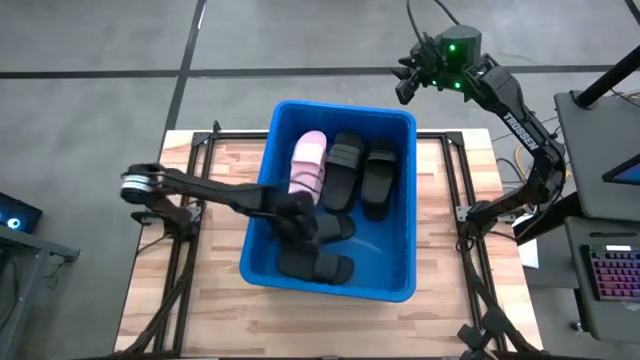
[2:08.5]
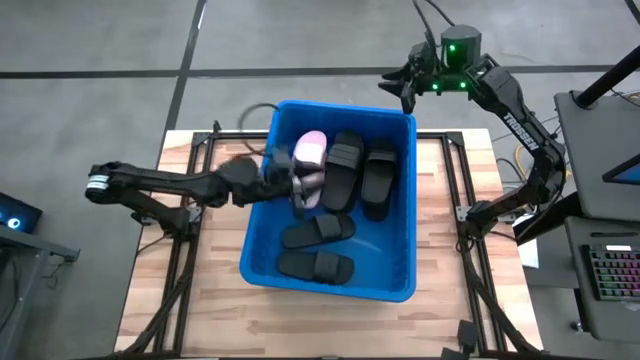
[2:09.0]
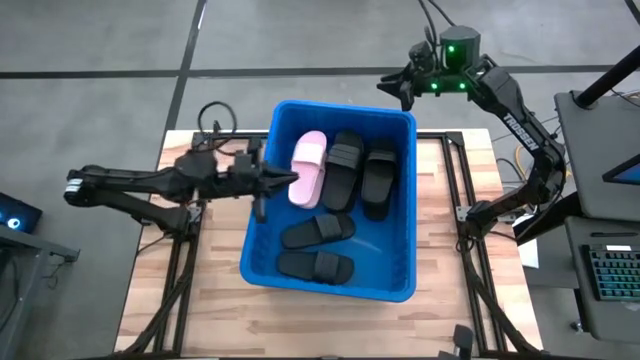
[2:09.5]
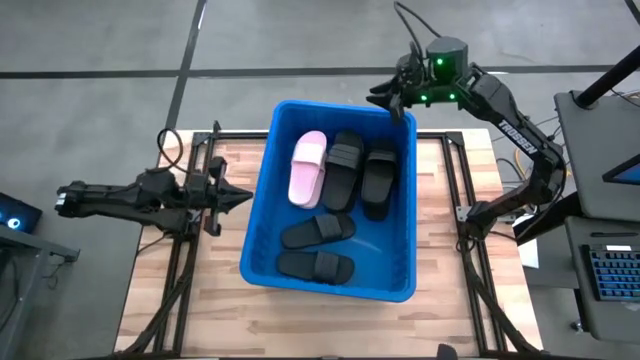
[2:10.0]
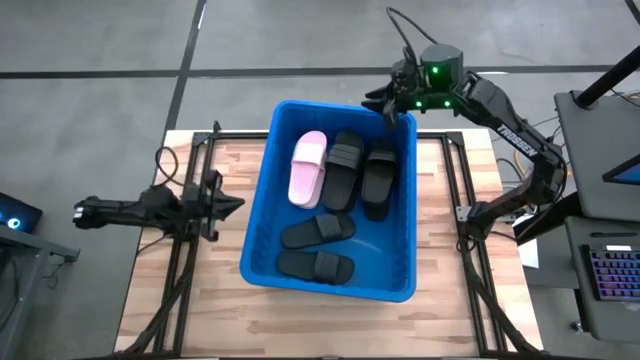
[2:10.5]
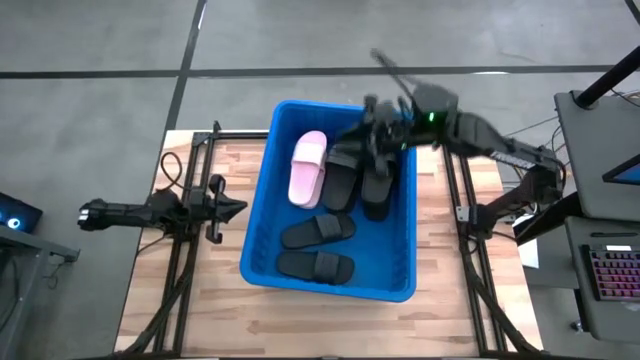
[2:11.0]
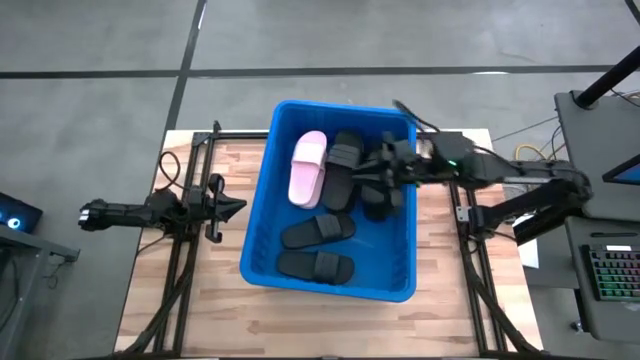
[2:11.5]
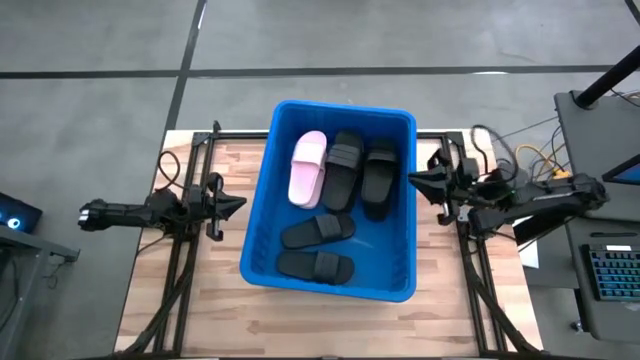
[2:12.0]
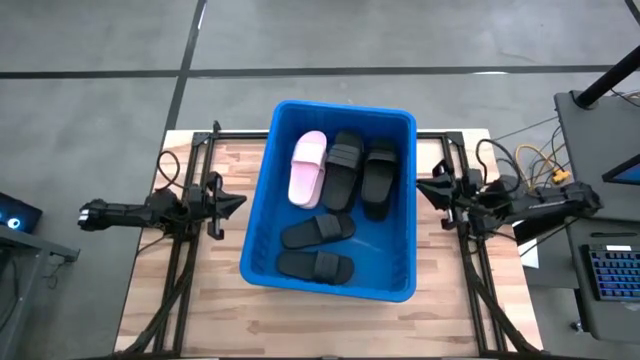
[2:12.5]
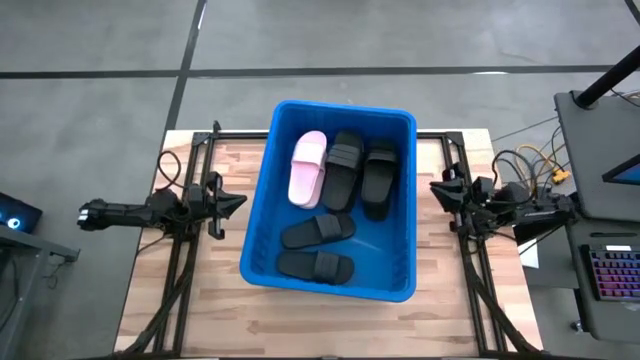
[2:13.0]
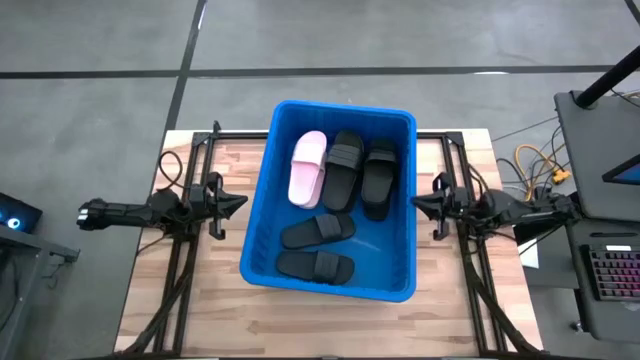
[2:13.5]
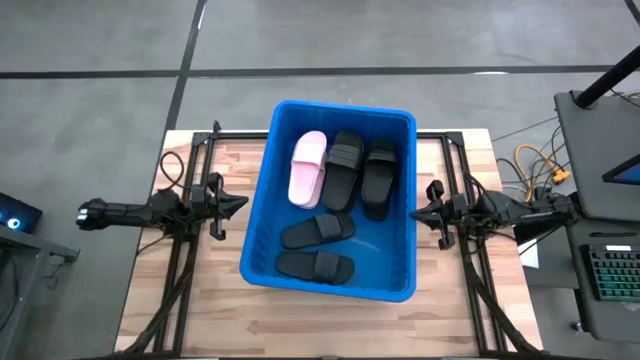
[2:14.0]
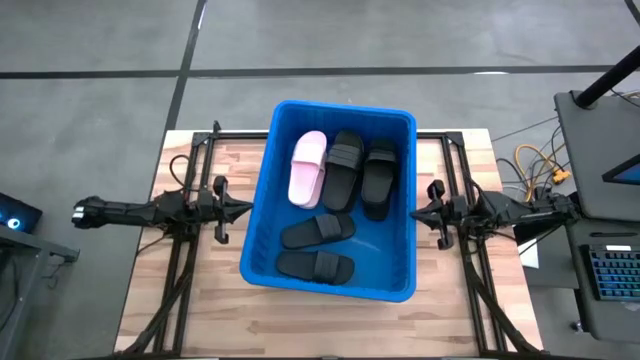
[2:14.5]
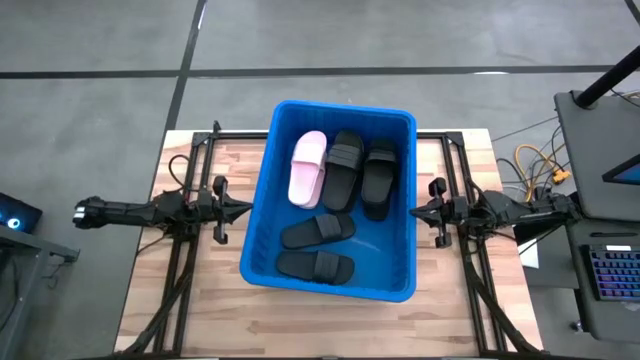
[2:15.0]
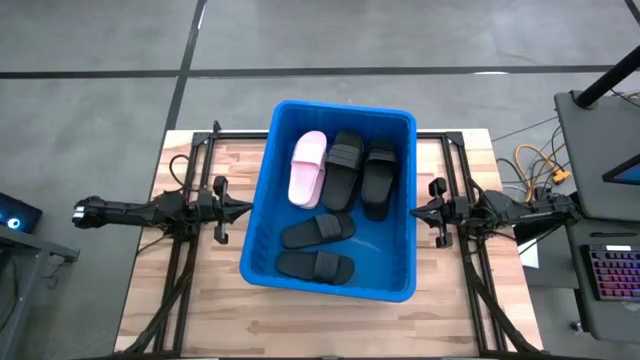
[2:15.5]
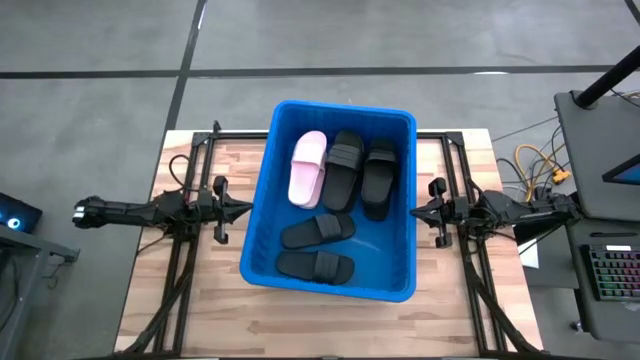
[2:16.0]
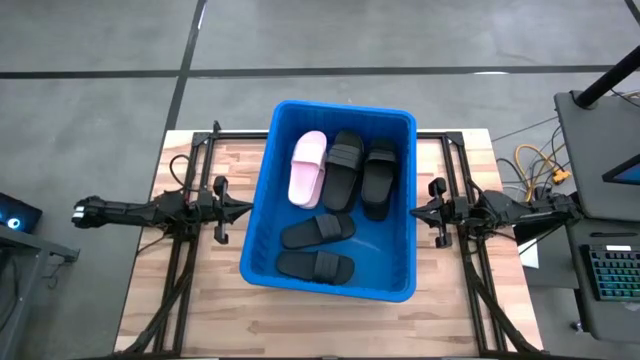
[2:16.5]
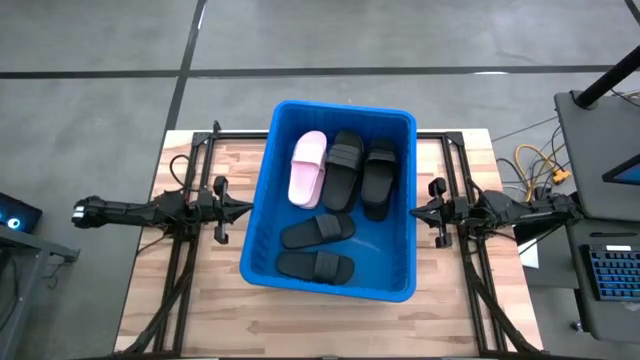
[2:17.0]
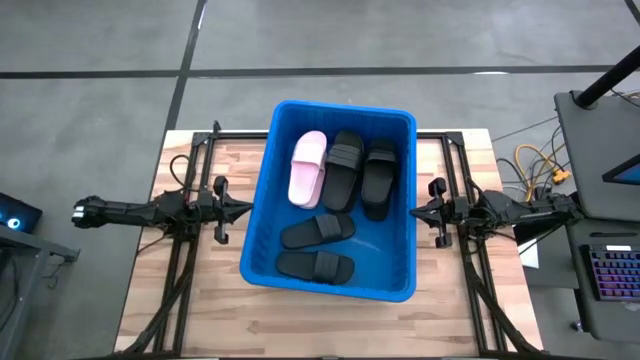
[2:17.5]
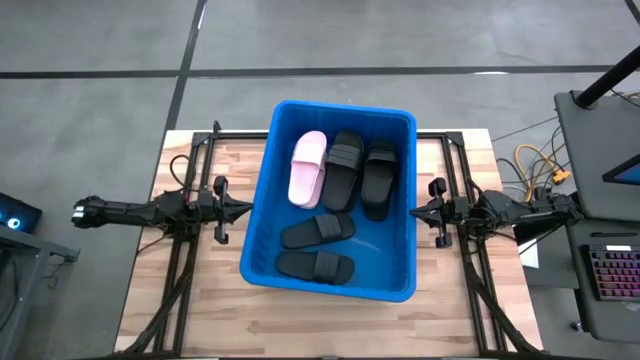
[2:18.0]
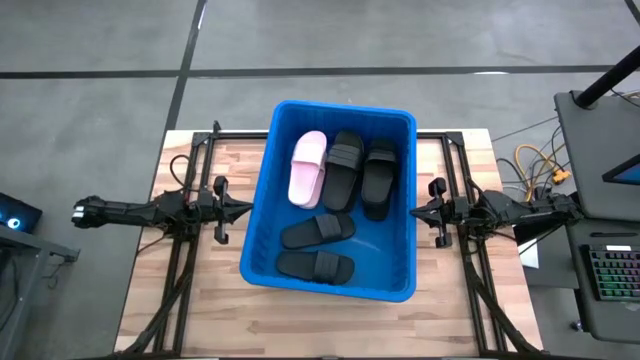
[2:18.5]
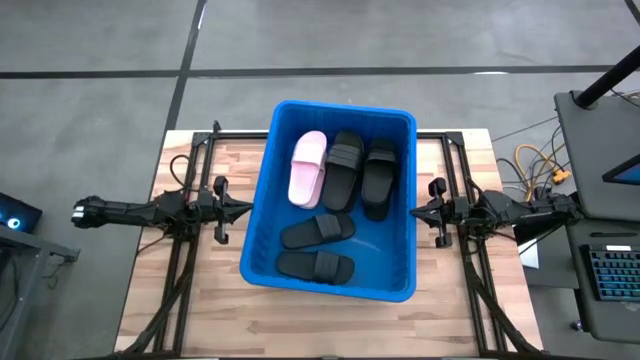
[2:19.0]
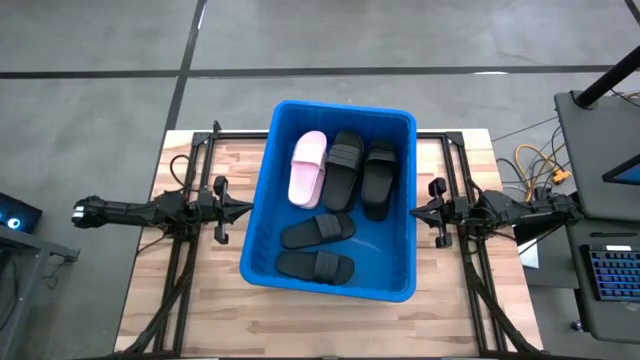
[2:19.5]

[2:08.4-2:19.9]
Task: Pick and place slides into bin
Return to Home Position

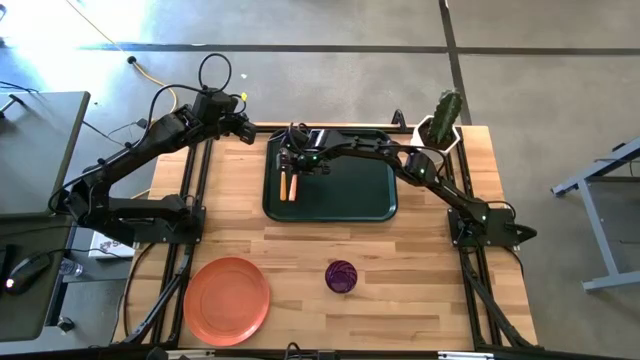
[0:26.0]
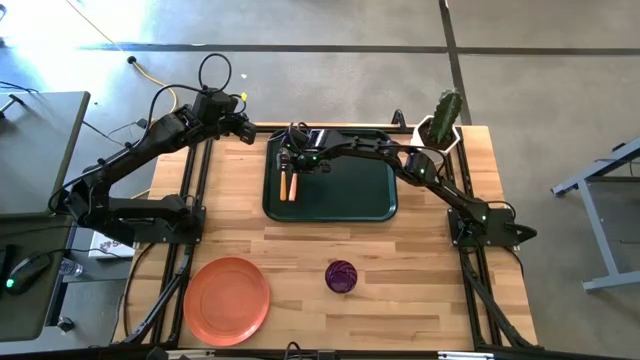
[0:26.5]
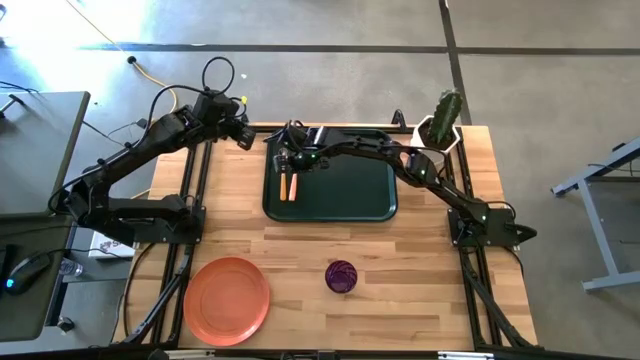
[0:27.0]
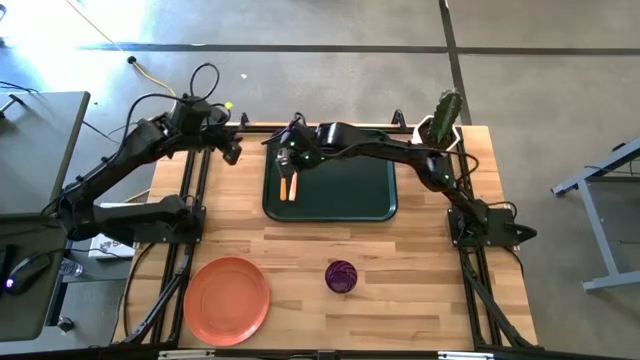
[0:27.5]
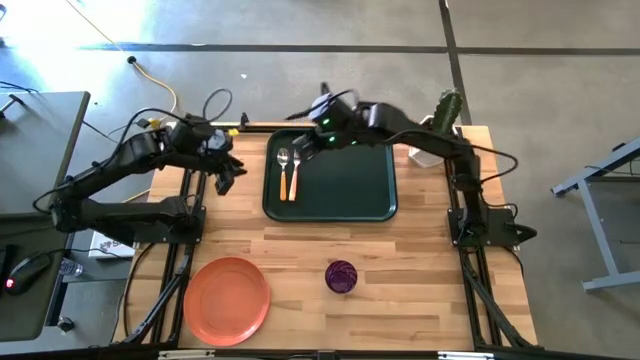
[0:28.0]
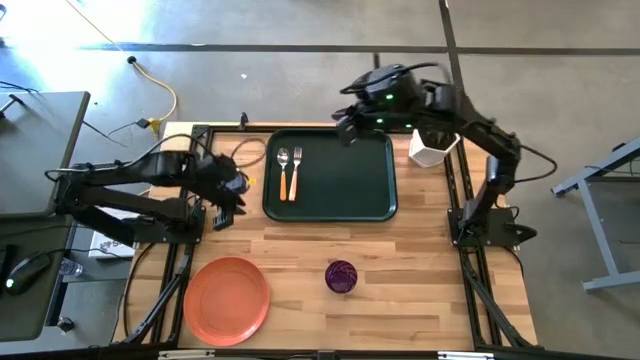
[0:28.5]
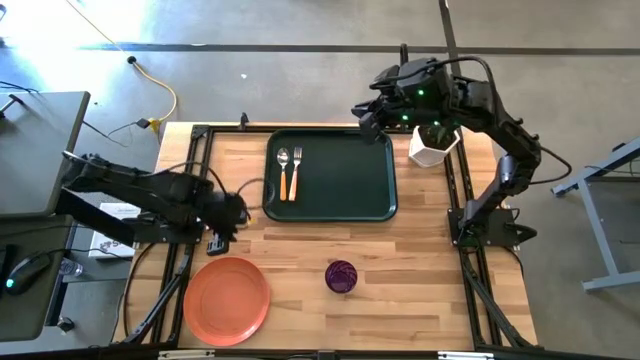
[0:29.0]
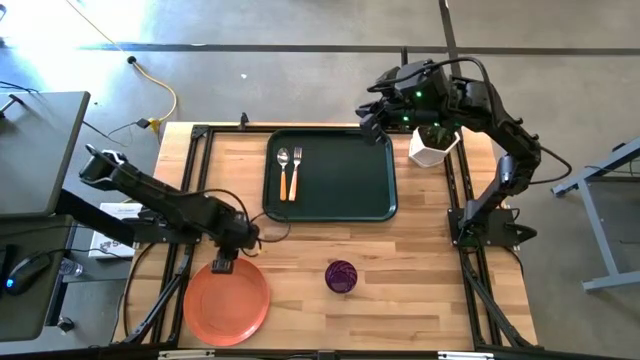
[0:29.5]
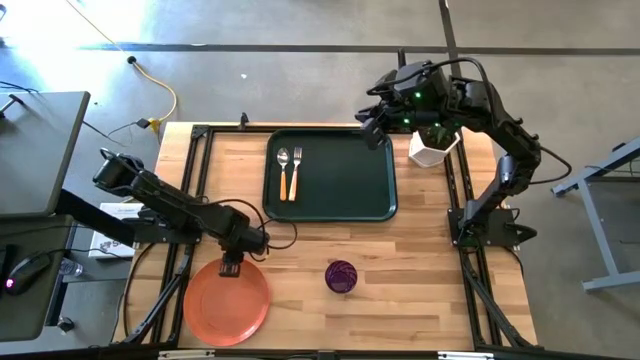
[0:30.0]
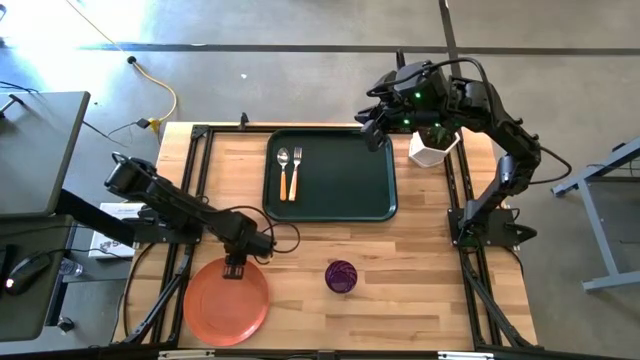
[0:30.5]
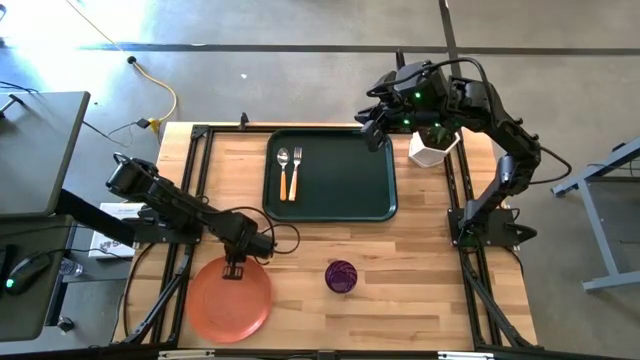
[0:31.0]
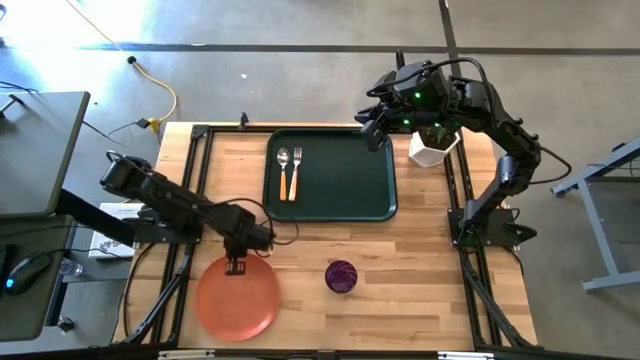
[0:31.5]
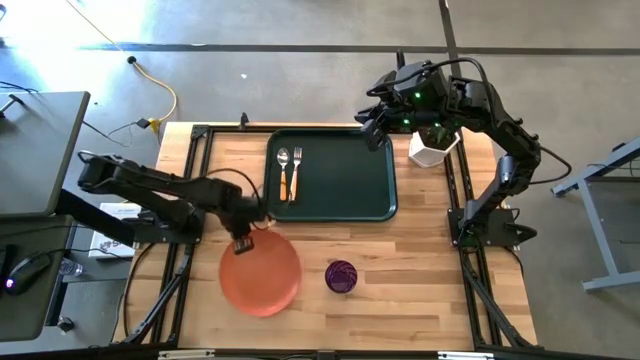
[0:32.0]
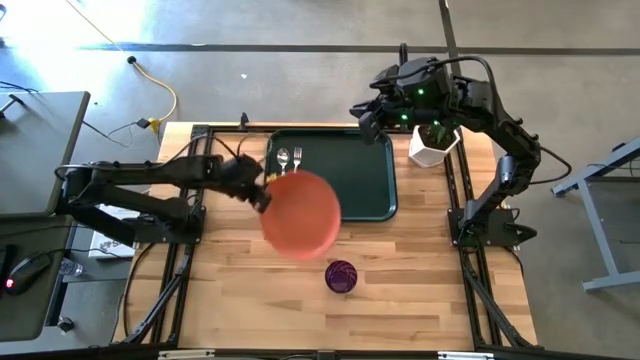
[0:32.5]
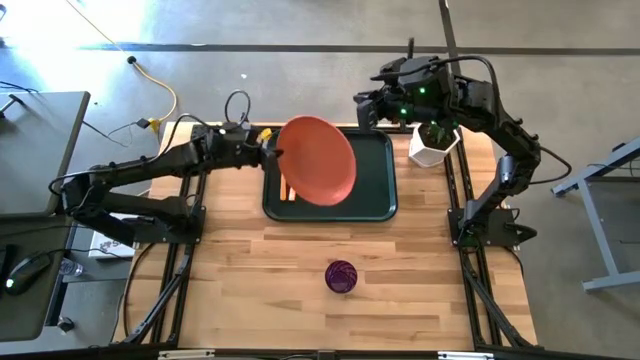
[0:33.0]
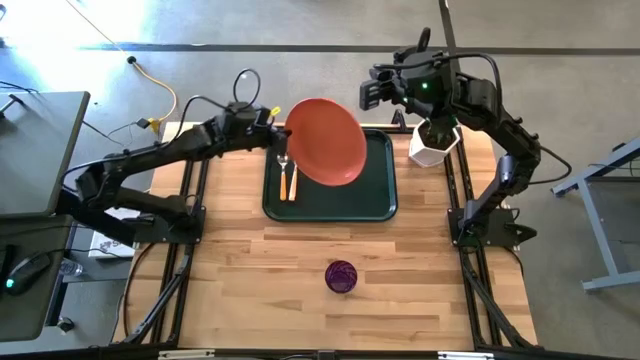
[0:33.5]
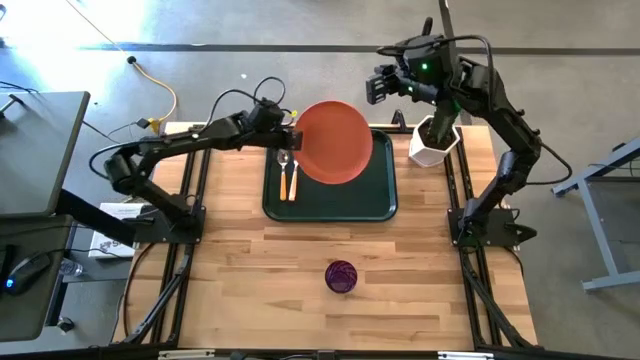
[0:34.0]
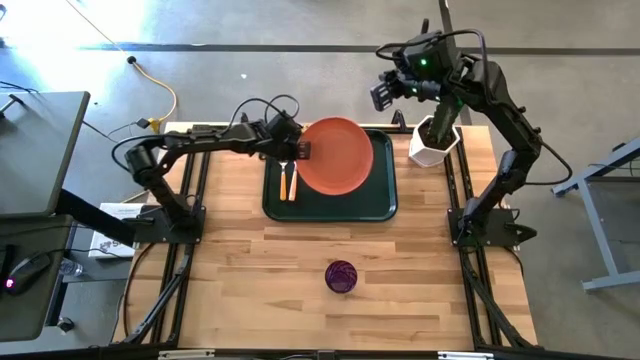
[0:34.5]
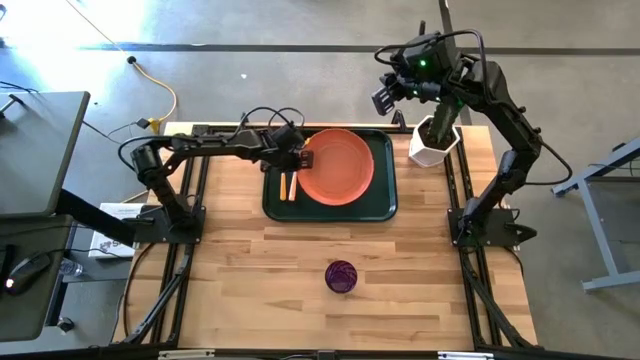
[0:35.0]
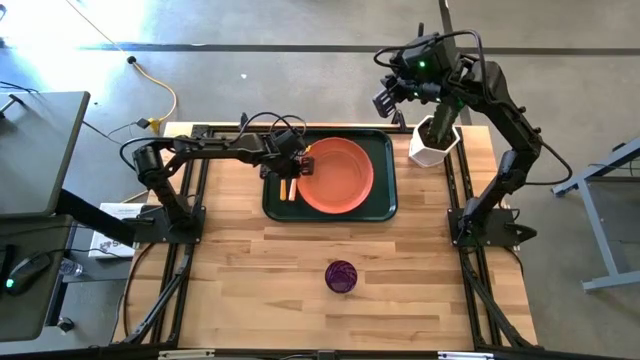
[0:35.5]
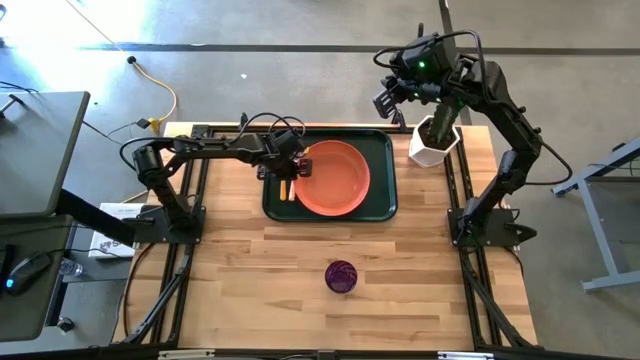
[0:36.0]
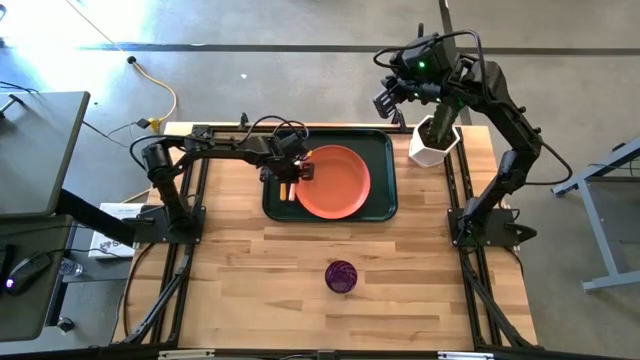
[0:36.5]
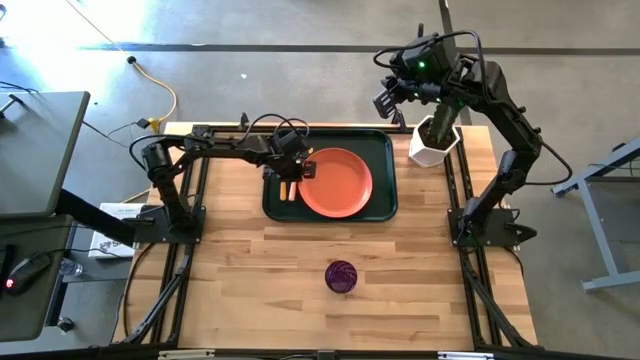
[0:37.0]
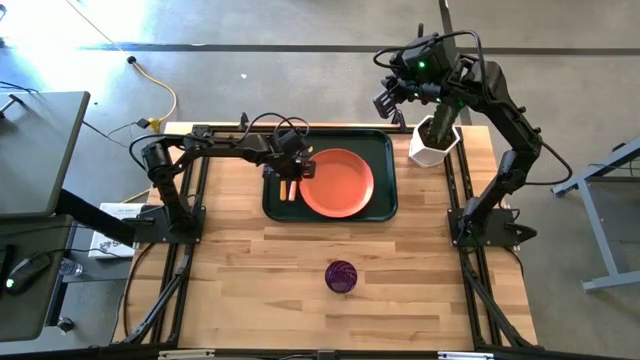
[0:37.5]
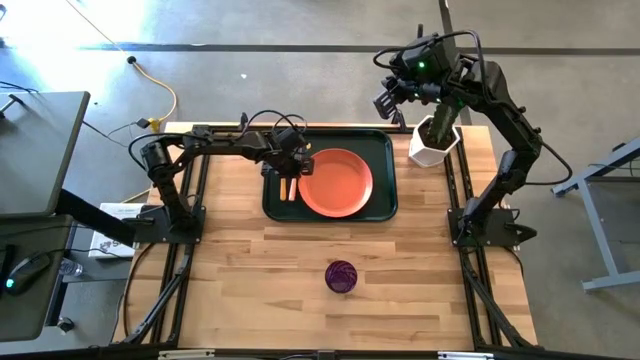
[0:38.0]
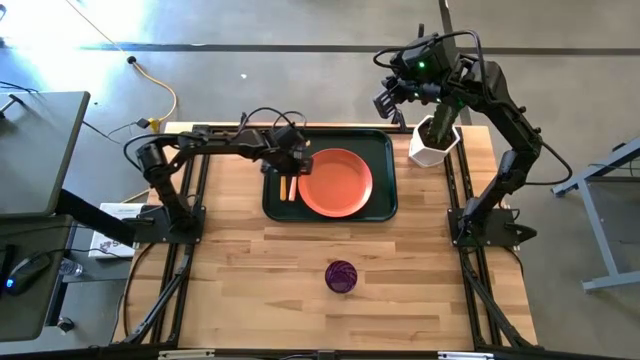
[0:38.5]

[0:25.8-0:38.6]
Task: Pick and place plate/cup/fork/spoon on tray
Put the orange plate on the right side of the light orange fork
